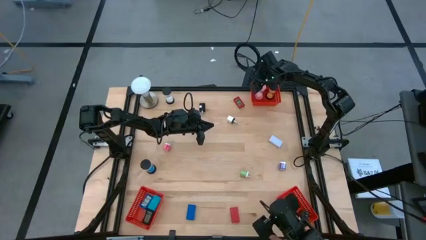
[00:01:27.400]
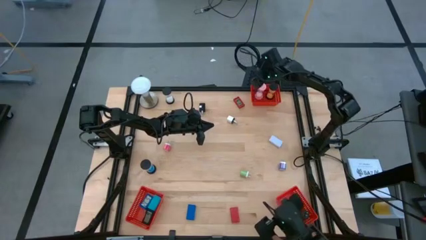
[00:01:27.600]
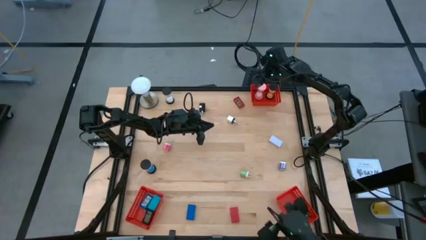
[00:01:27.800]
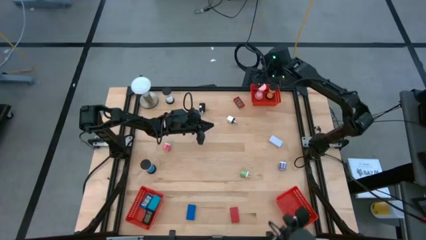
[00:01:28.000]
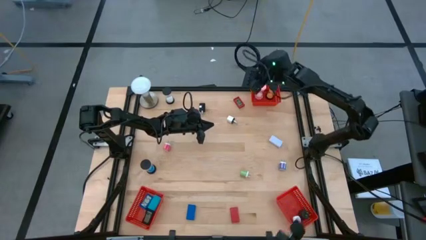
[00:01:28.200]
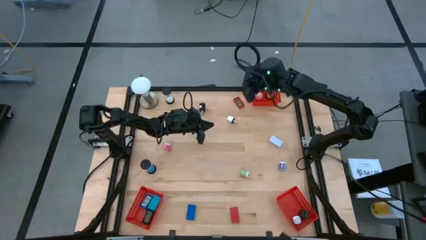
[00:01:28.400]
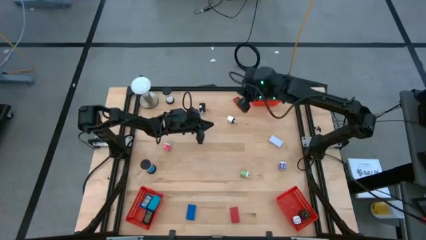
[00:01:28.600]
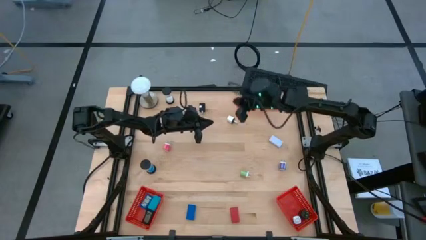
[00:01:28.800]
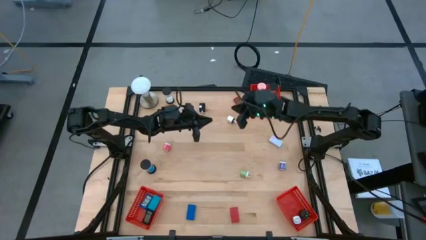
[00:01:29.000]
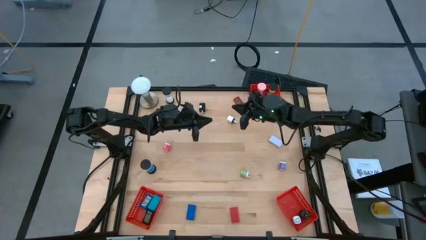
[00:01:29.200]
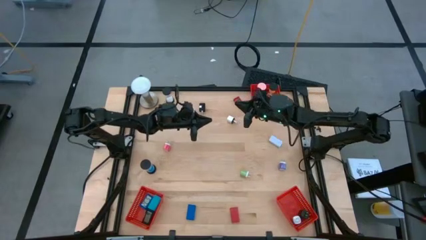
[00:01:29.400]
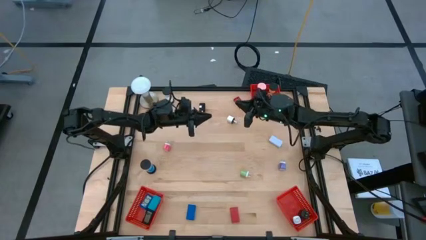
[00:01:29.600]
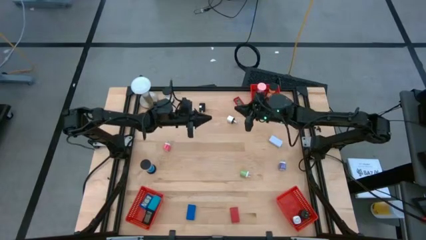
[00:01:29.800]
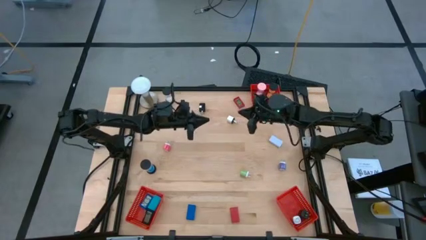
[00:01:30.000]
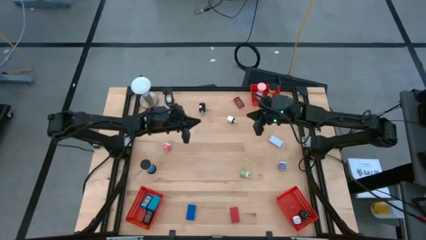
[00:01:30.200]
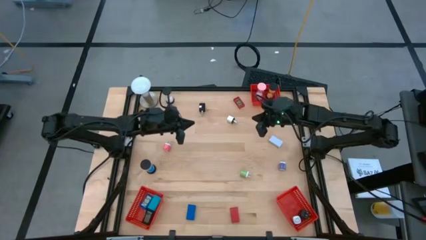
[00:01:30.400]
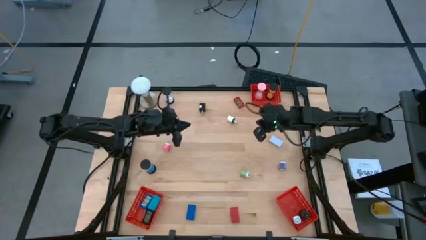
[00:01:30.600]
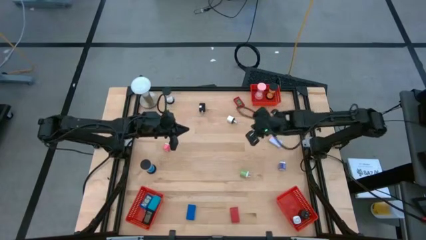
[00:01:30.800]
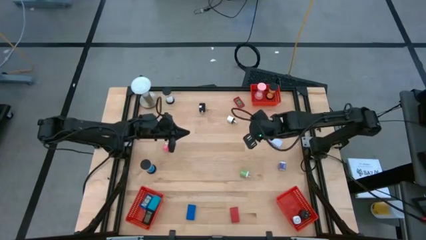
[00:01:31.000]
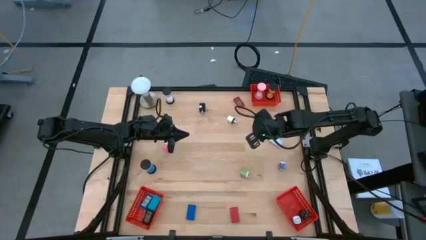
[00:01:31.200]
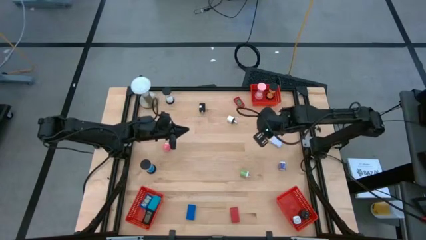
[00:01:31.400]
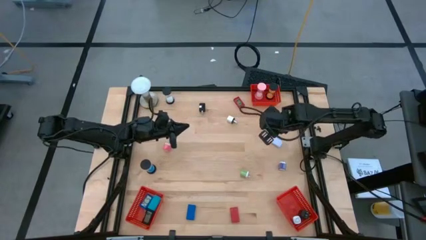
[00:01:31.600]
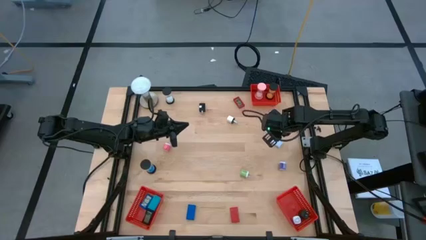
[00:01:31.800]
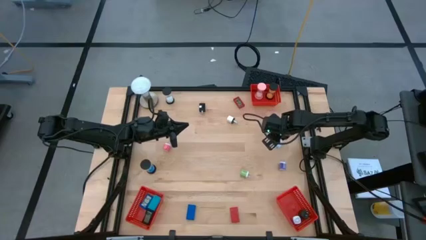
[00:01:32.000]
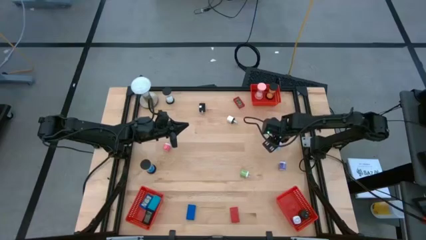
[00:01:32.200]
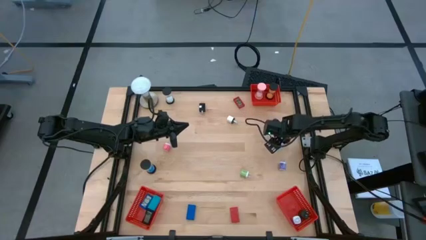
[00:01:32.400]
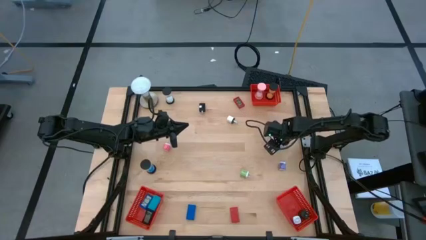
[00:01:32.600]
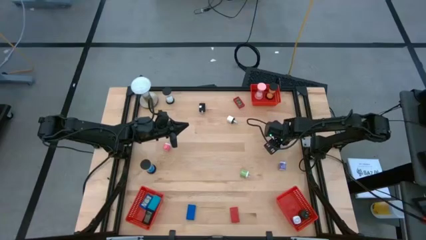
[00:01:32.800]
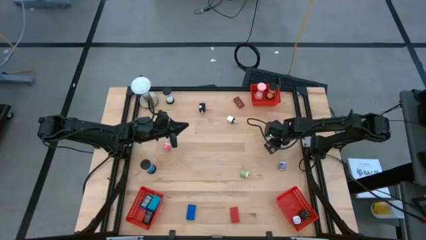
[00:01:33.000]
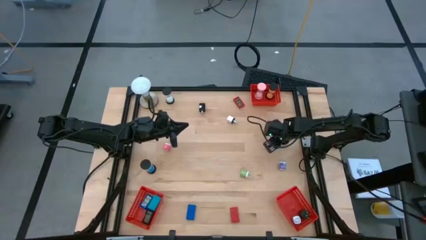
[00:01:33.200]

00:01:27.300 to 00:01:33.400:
Task: Pick & Place Office items
Put the white digital clock into the bottom left red basket

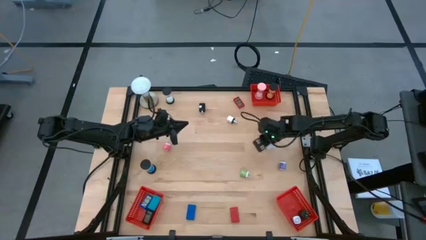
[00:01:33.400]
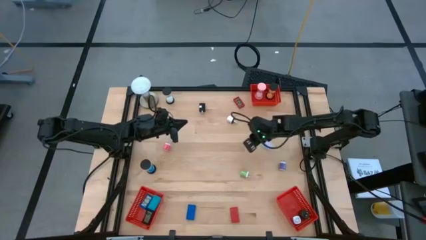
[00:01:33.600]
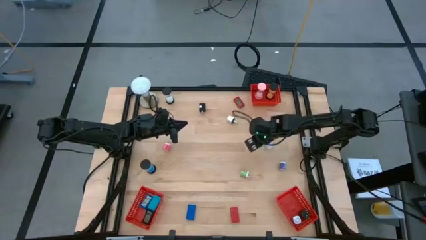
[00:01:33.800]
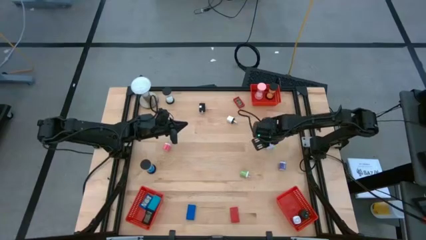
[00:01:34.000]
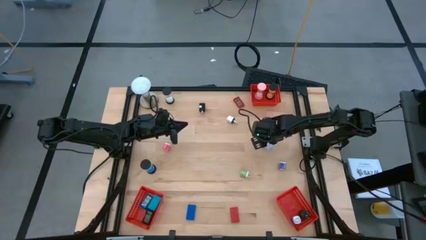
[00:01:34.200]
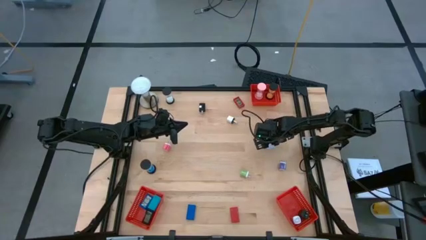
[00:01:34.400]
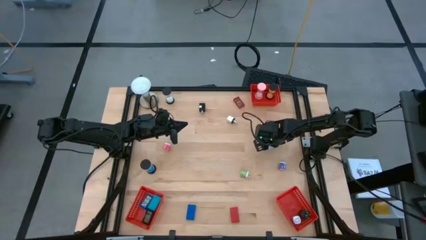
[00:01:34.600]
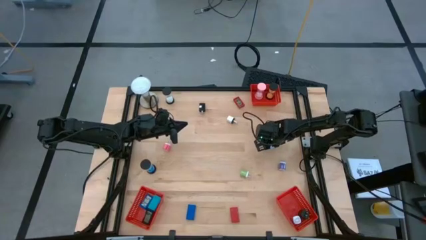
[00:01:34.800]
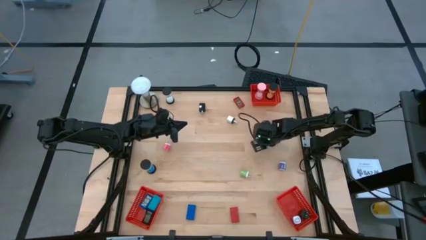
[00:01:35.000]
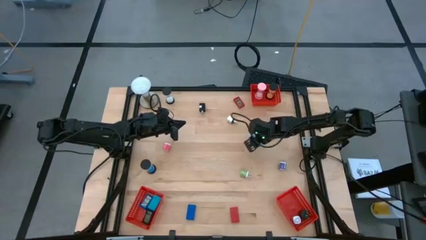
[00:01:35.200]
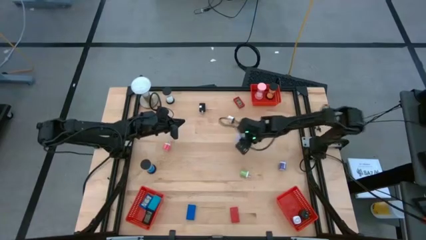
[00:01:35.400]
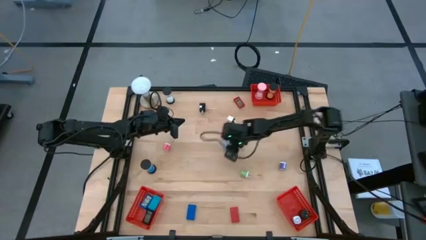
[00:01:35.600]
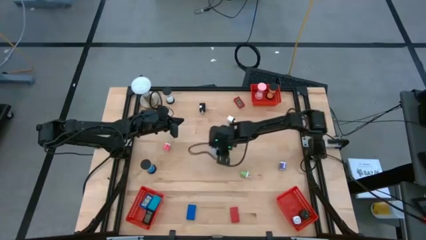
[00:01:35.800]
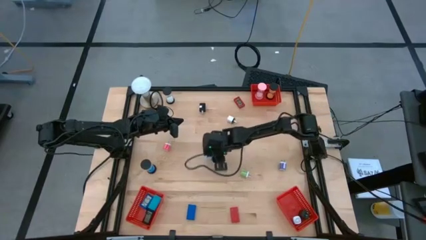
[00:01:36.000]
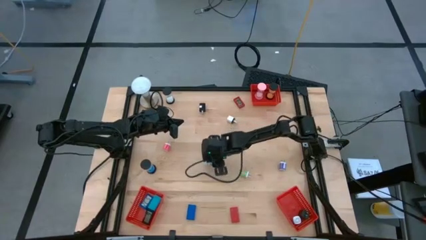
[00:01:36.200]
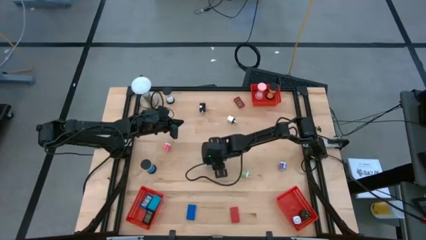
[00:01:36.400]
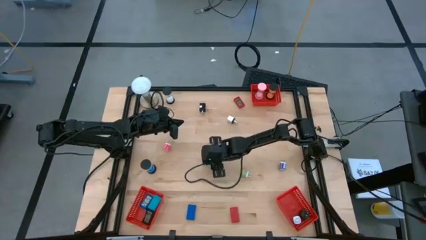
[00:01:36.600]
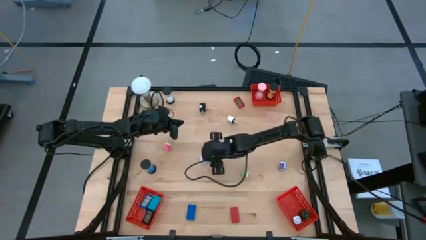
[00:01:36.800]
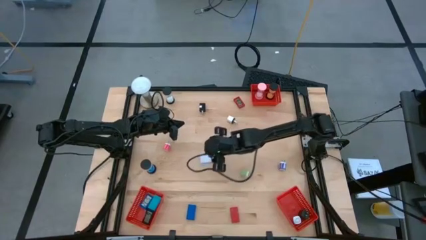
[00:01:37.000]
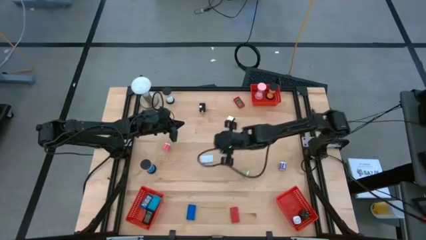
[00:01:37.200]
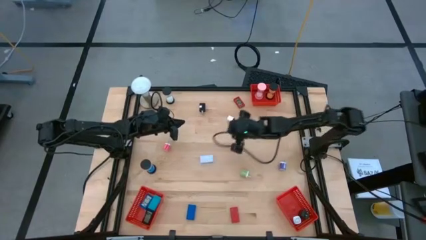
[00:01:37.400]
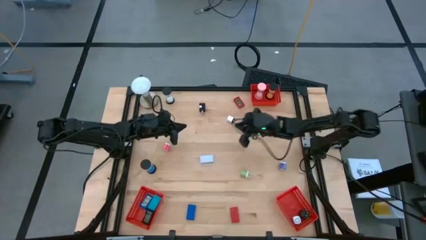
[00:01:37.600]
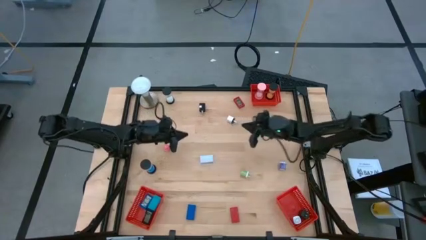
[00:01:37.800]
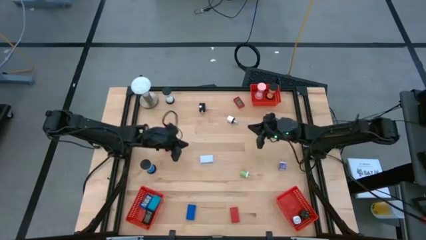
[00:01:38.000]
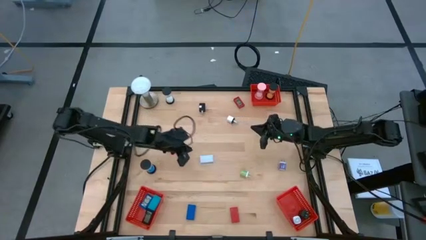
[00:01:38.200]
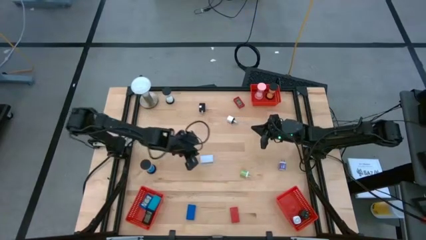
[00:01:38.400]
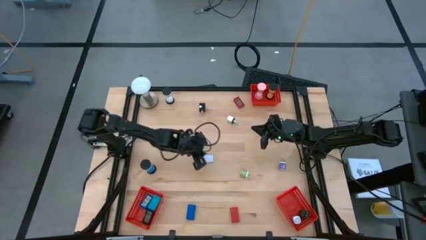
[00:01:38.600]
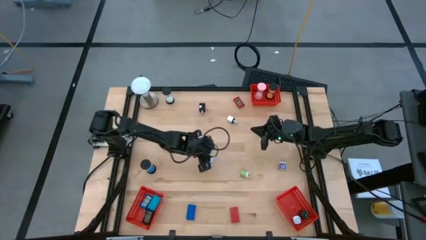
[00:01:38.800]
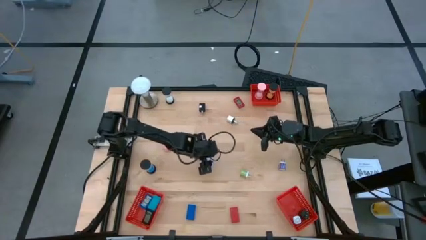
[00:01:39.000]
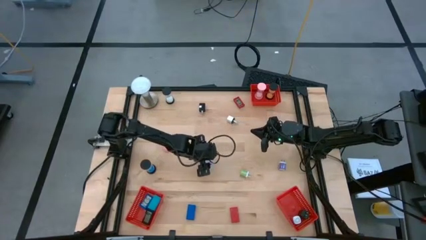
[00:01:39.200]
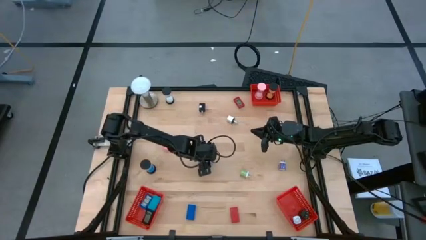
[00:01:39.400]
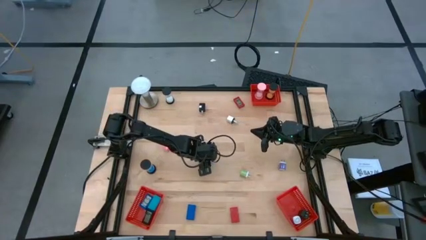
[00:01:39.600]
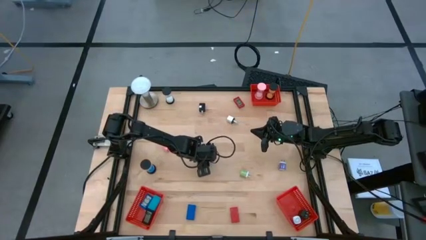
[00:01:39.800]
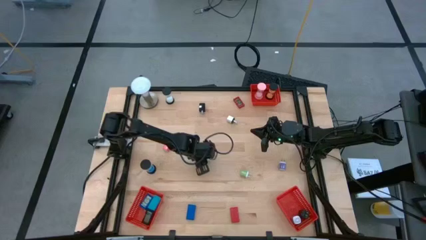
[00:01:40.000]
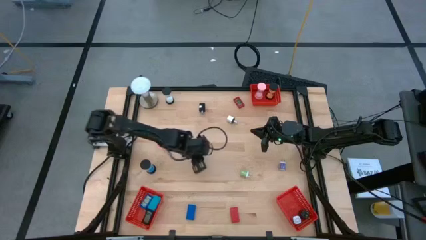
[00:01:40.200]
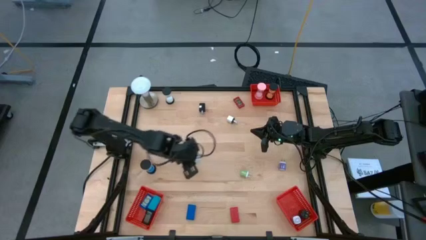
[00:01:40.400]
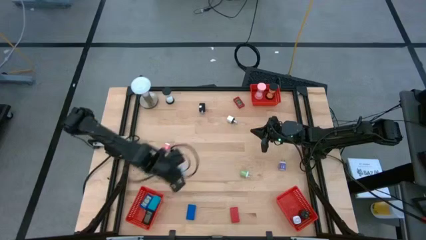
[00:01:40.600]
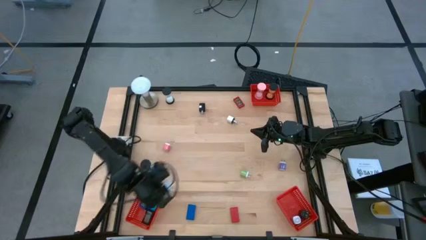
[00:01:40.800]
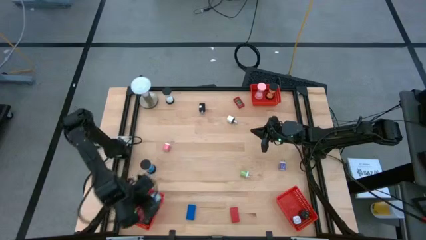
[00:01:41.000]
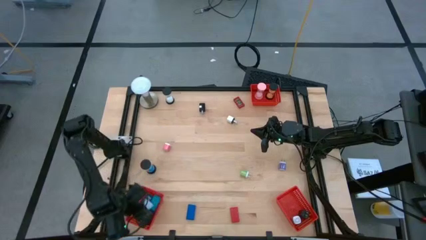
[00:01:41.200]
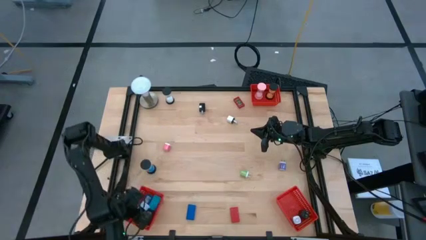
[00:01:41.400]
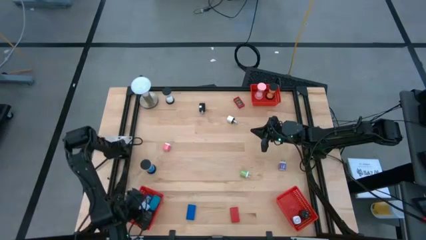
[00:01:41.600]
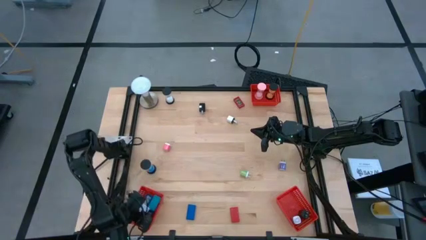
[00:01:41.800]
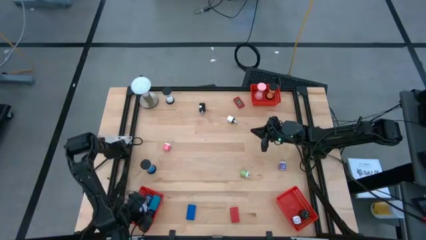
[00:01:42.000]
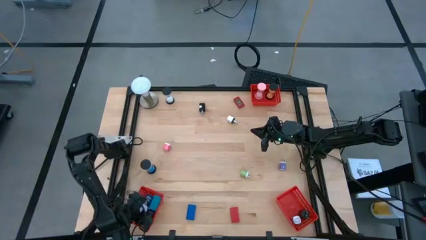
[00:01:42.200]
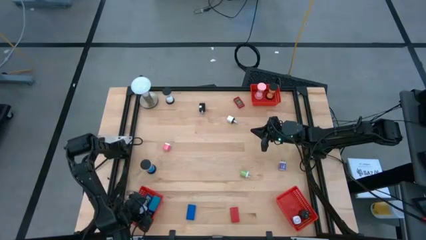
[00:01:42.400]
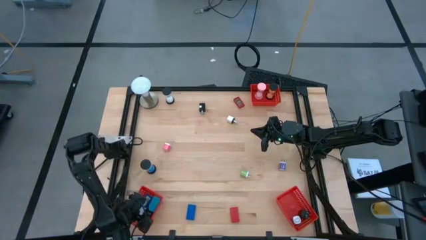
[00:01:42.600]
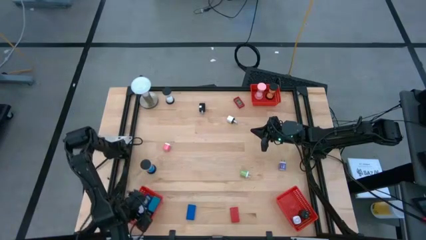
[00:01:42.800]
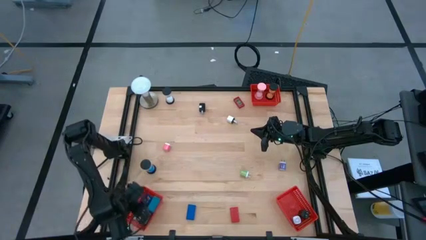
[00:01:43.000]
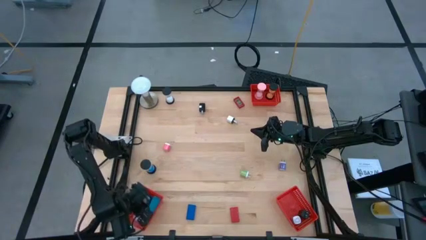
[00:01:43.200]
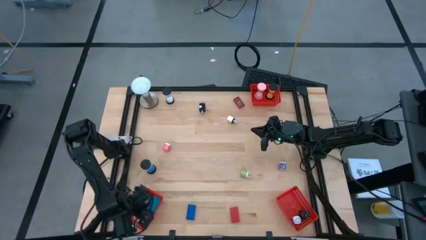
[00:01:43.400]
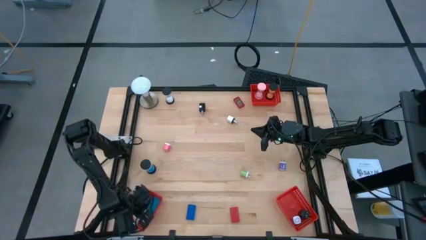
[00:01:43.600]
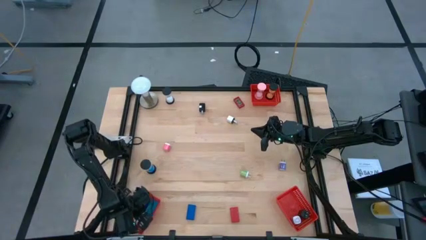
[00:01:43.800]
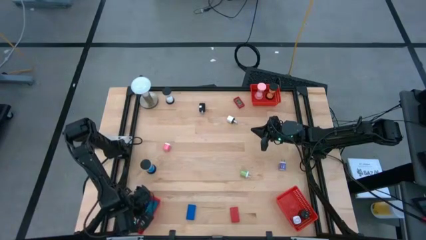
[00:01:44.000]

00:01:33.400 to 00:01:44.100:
Put the white digital clock into the bottom left red basket

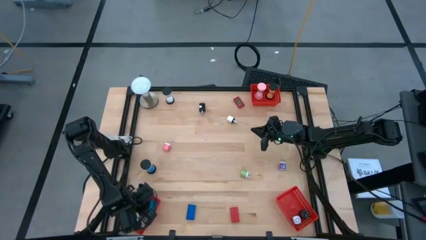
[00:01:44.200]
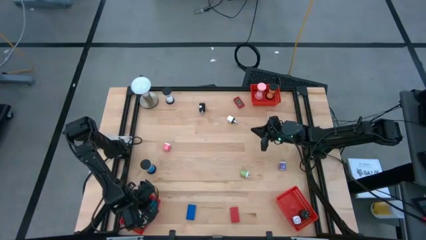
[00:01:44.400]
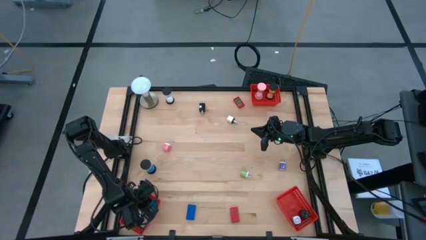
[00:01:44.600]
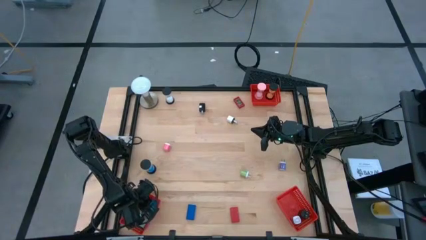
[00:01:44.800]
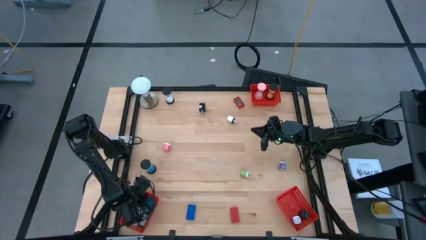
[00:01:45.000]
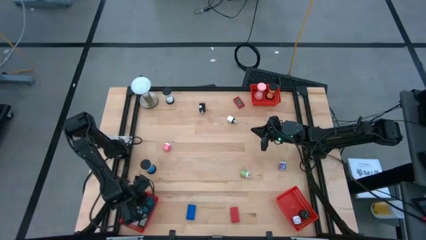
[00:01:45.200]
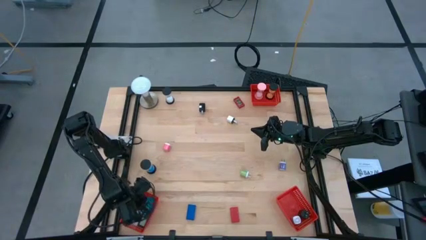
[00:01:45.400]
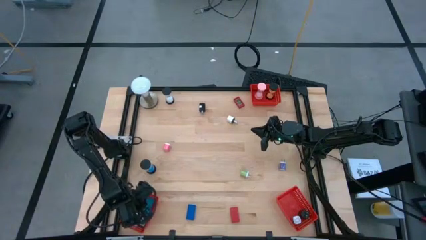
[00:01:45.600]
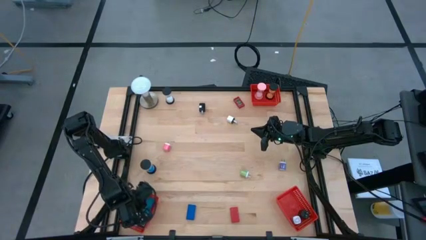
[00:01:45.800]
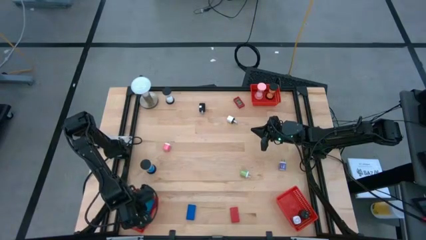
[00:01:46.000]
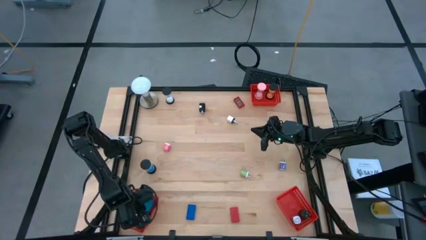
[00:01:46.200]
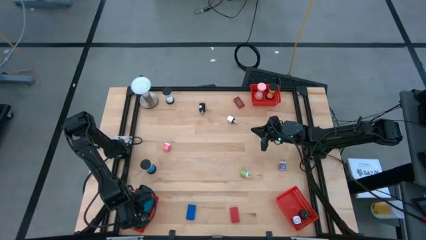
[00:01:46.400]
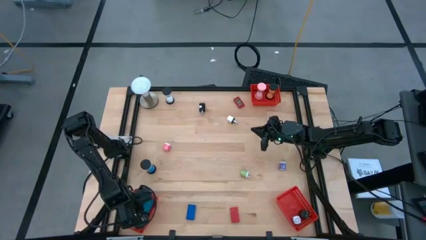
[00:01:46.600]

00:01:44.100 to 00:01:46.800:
Adjust the digital clocks in the bottom left red basket
